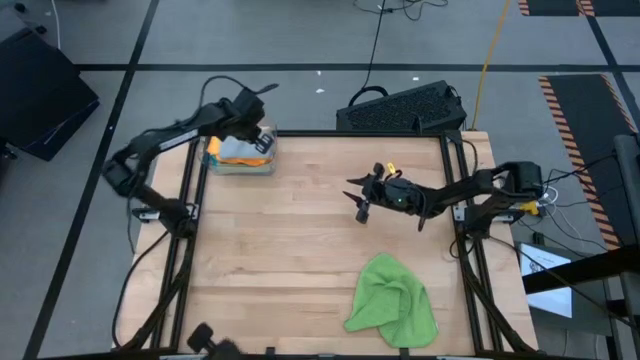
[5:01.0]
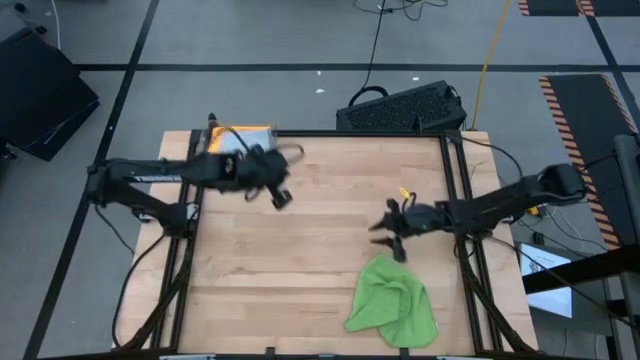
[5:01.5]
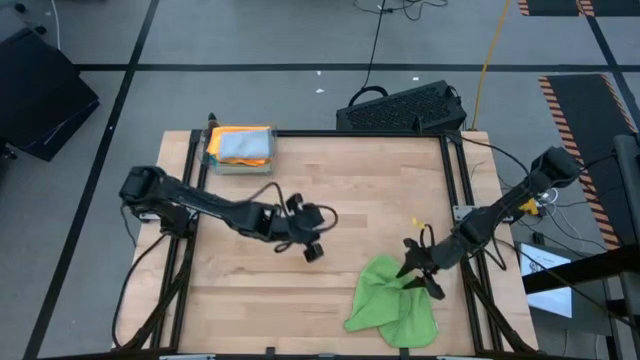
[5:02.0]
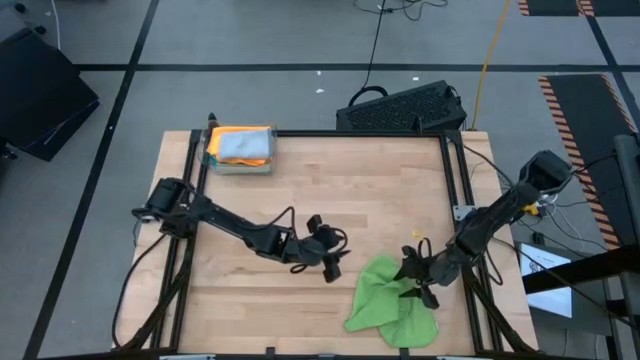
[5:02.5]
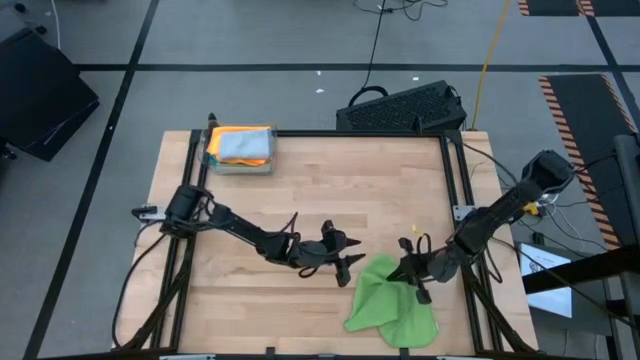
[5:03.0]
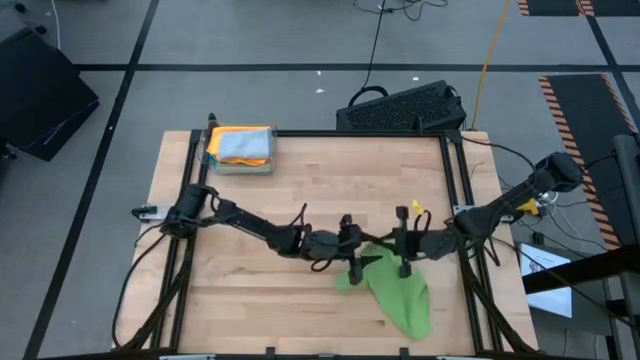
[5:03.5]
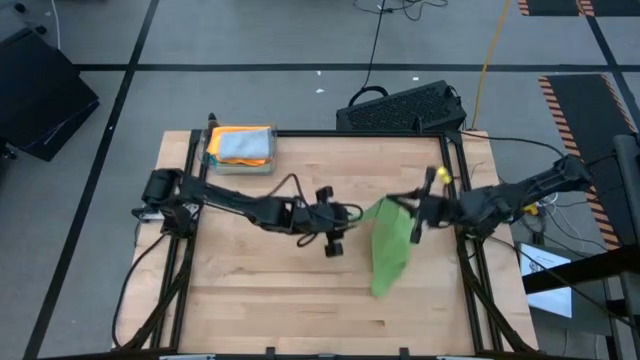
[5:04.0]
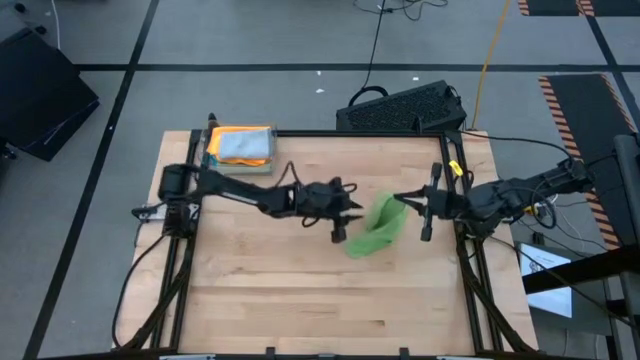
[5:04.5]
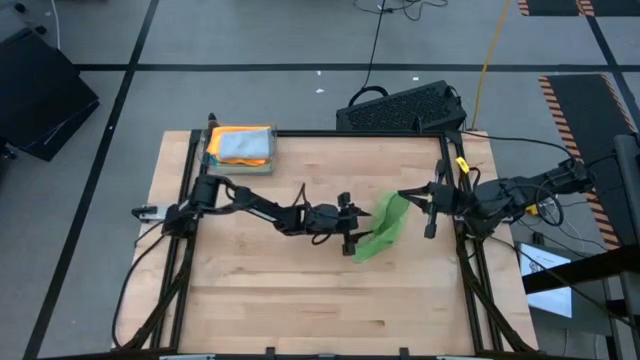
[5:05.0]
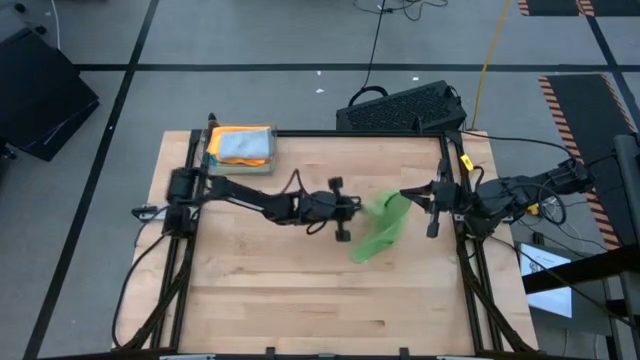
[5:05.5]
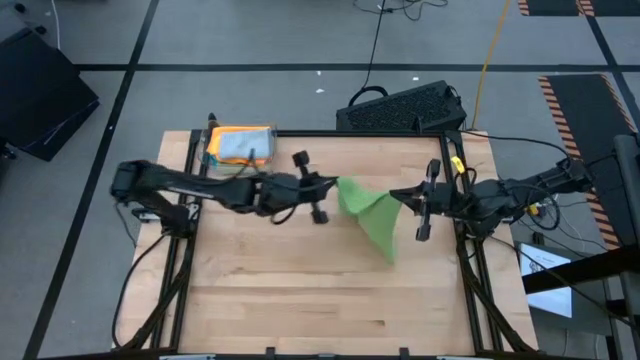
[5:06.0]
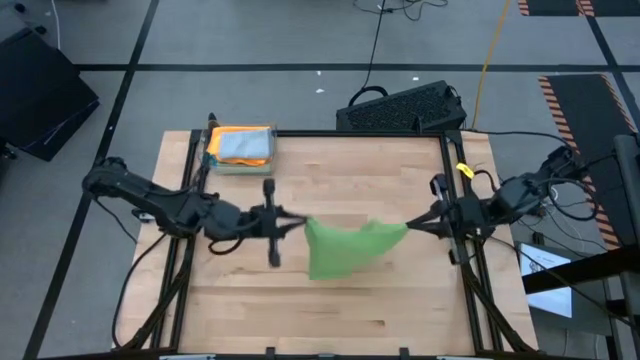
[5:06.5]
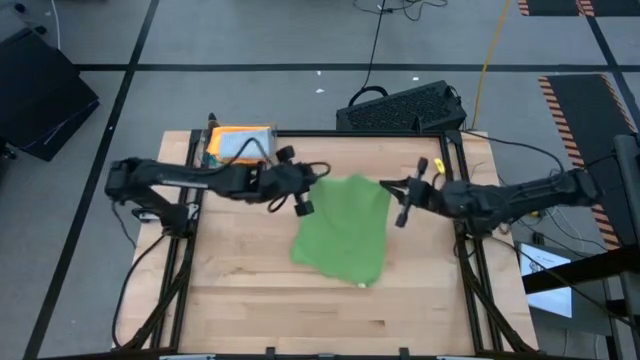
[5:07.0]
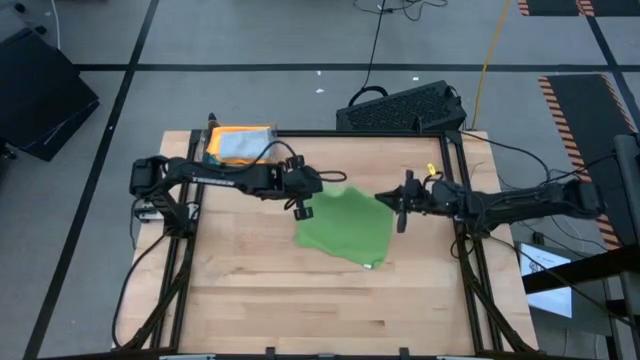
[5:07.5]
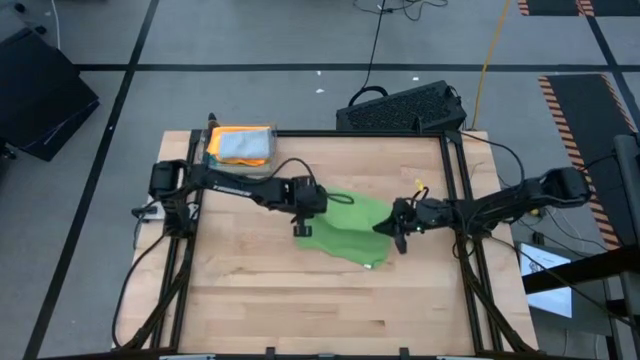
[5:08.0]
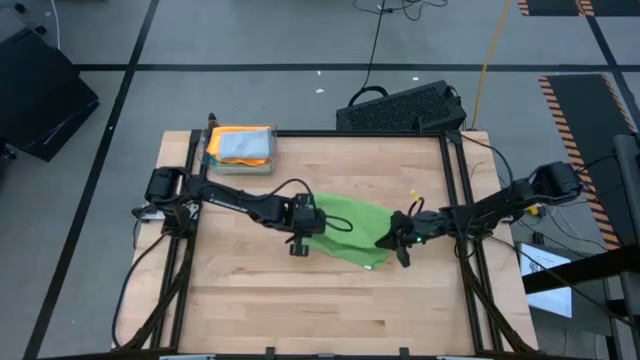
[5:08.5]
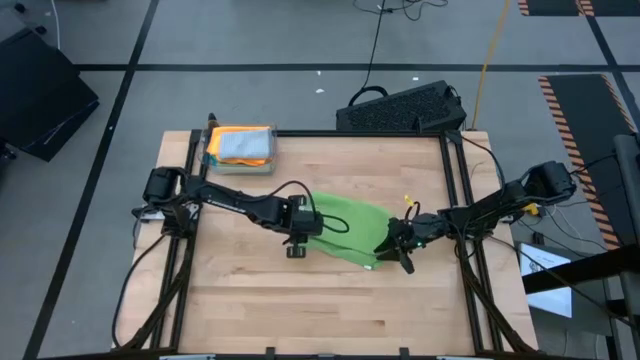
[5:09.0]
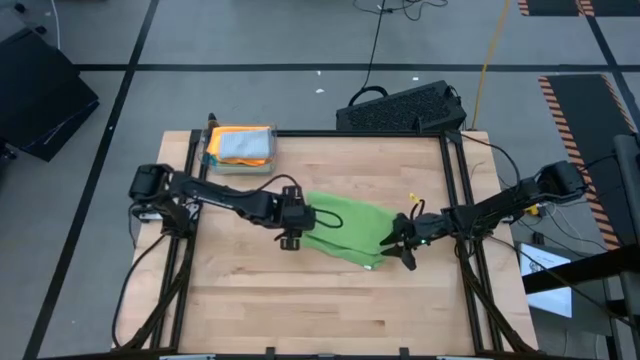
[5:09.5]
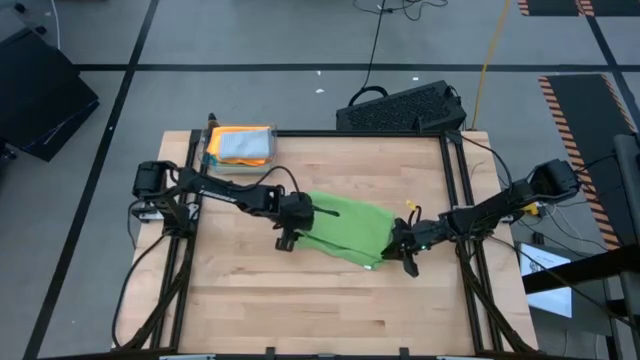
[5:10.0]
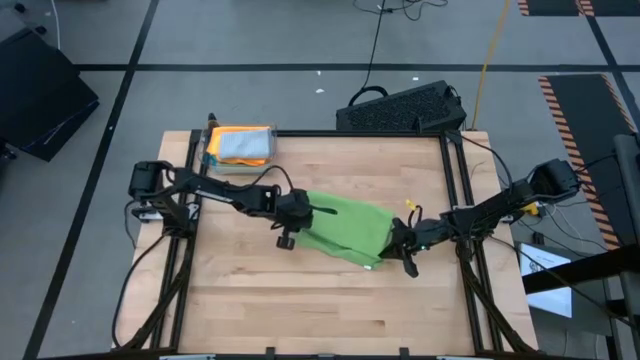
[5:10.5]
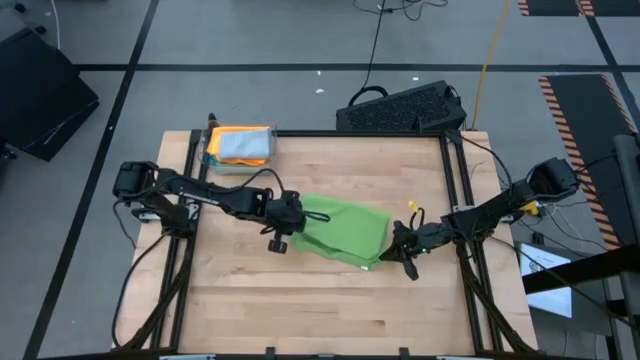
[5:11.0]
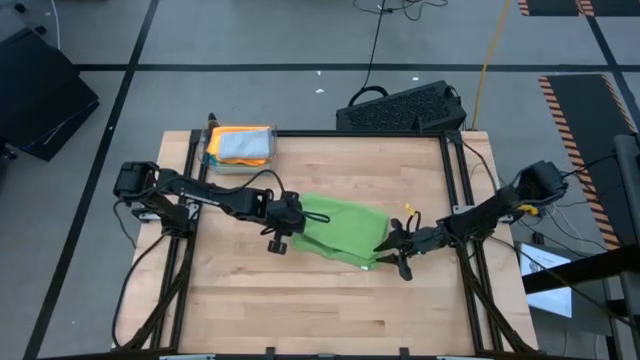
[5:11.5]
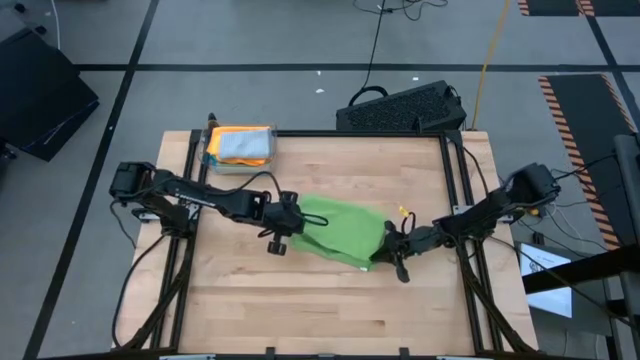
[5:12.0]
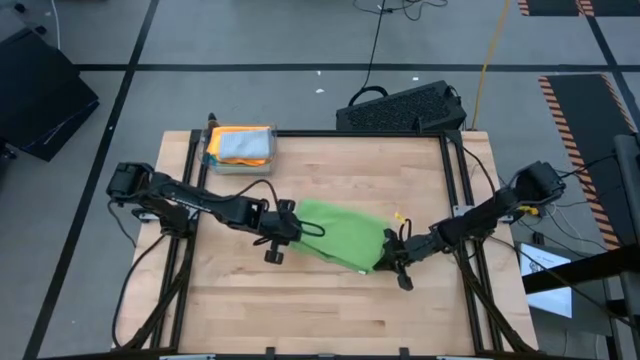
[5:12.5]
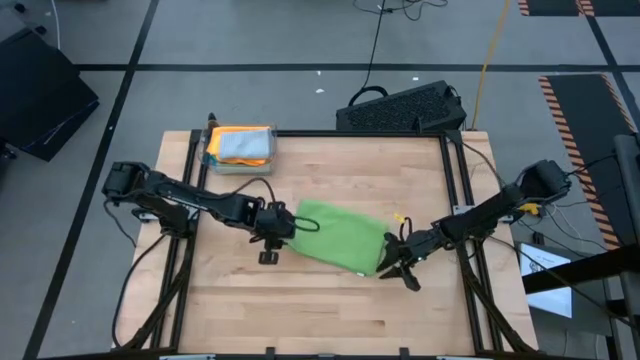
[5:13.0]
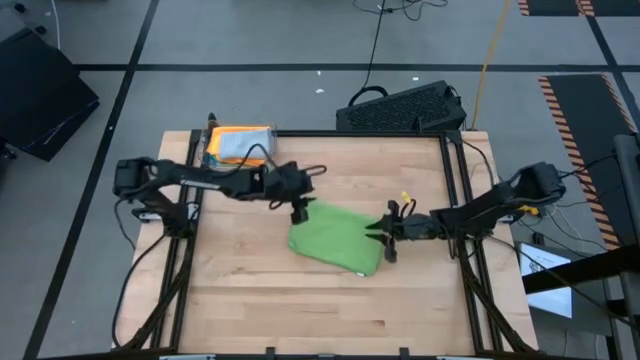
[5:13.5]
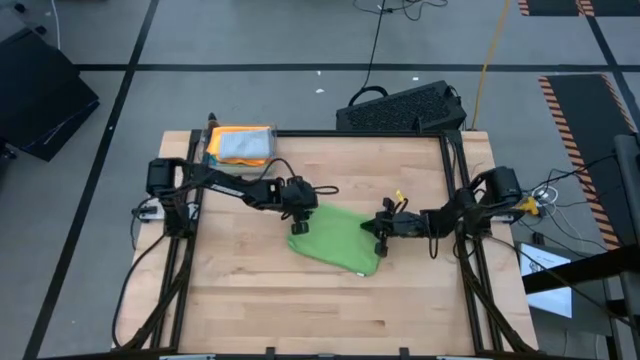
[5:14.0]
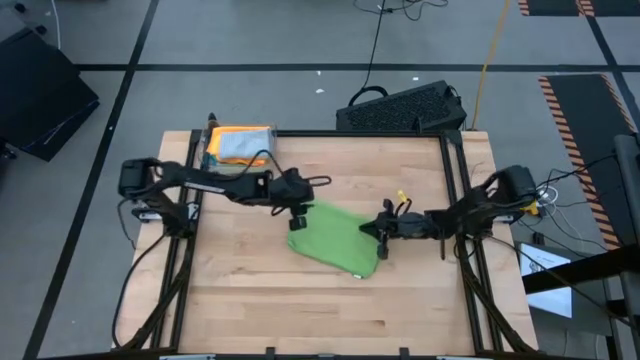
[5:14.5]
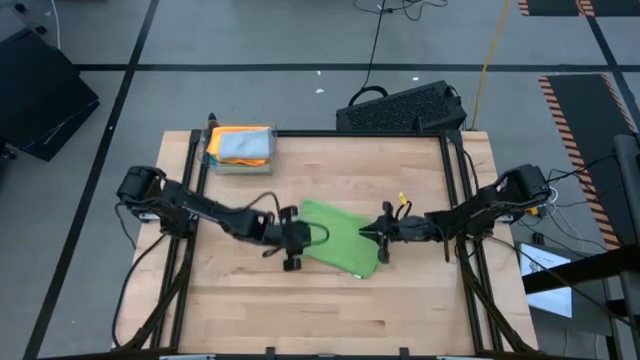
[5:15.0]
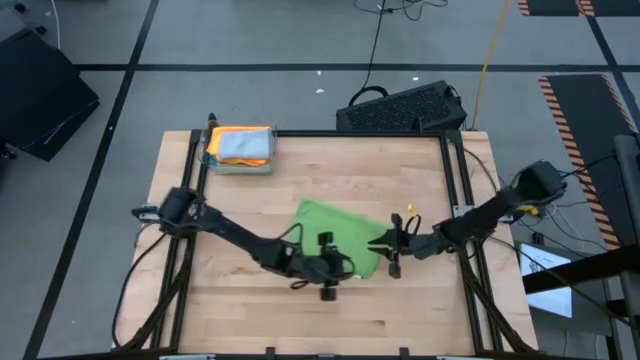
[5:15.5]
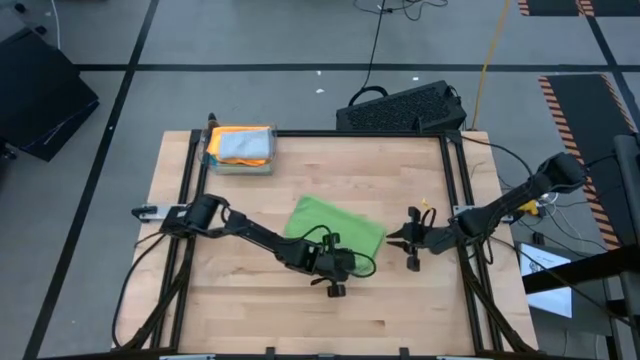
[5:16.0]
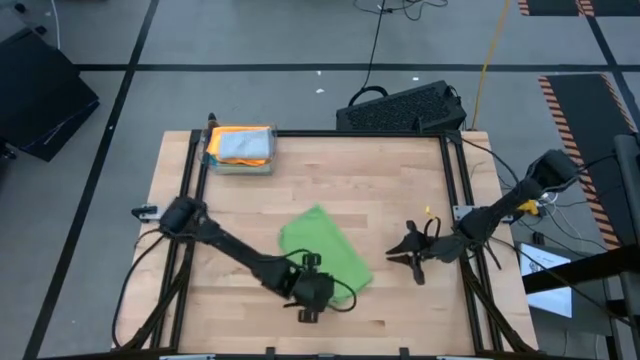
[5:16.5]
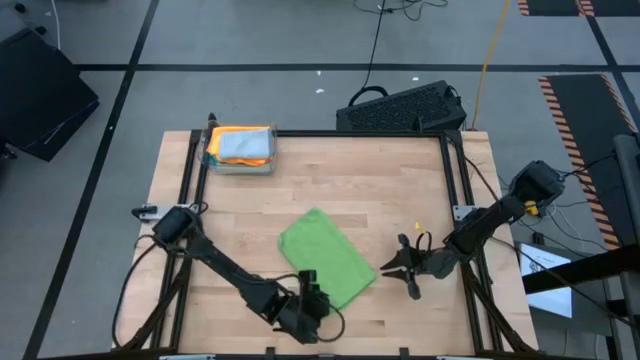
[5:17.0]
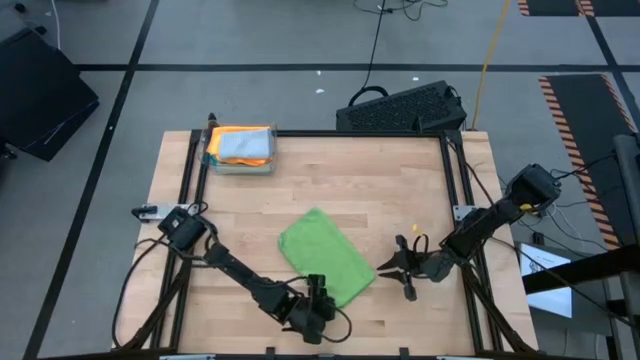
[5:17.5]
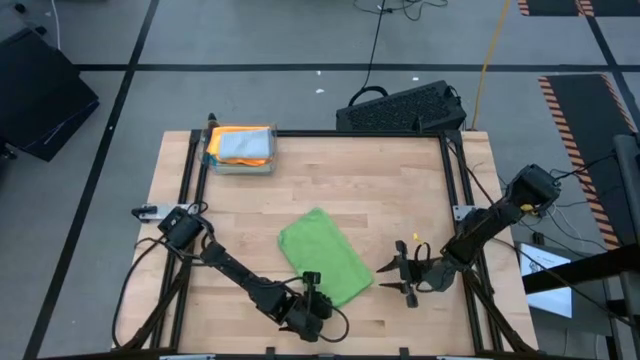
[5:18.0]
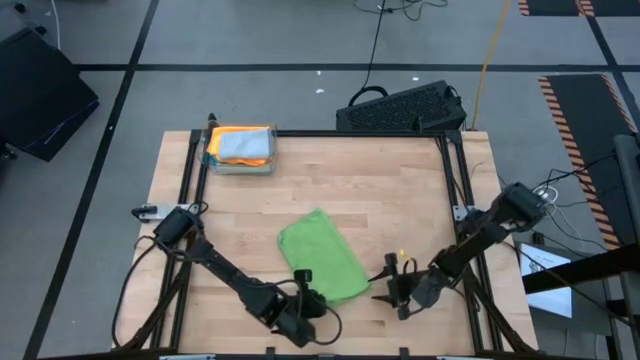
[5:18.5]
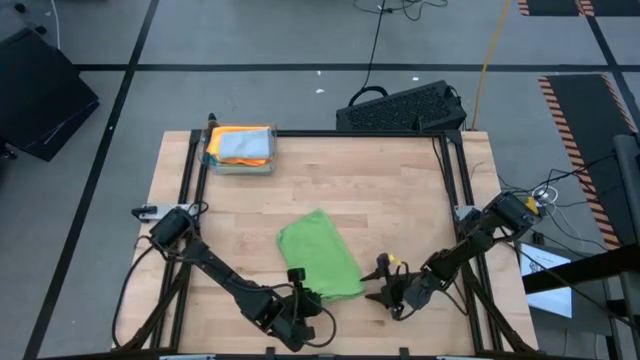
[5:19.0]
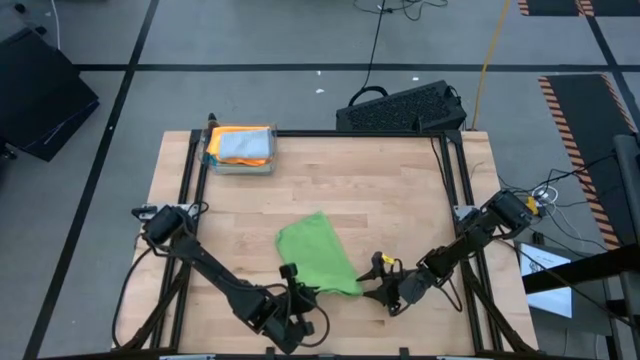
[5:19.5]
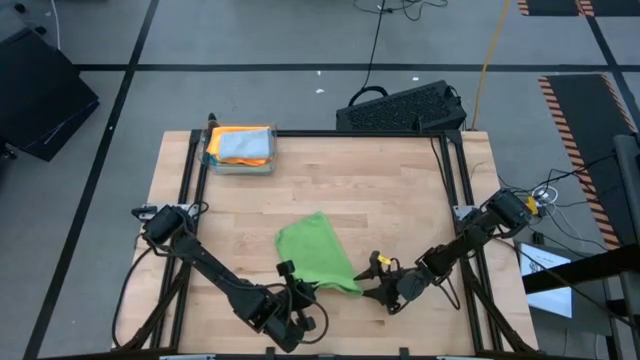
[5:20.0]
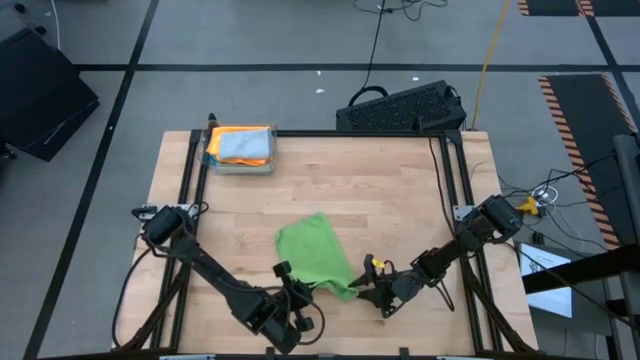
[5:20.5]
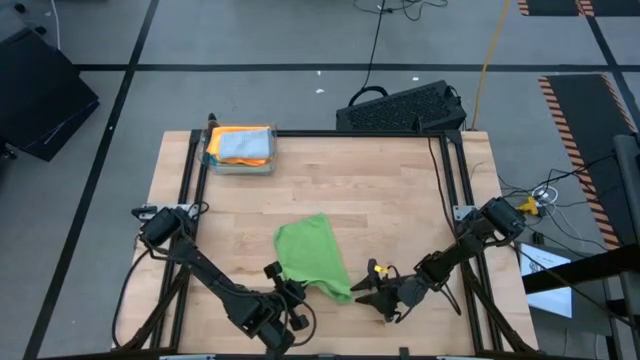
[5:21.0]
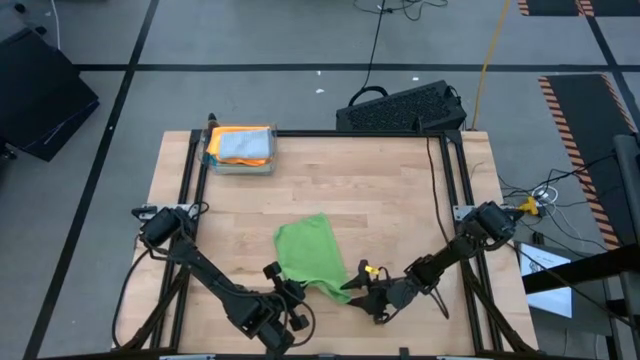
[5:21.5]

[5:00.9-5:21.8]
Task: Fold microfiber towels
Fold the green microfiber cloth

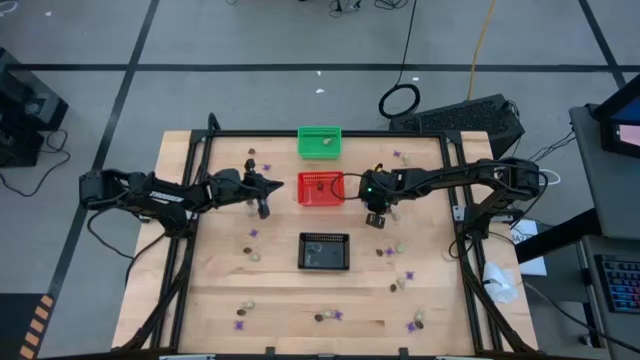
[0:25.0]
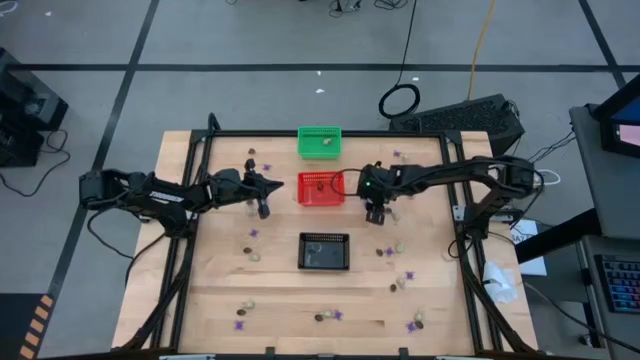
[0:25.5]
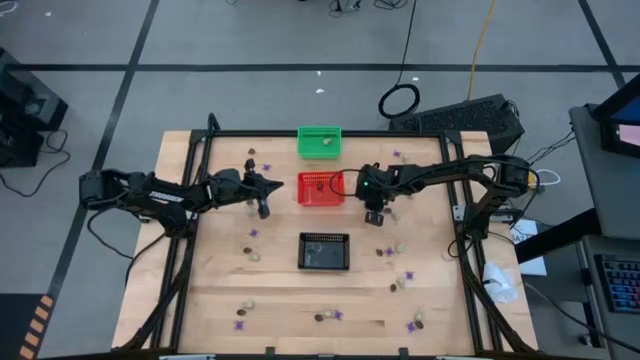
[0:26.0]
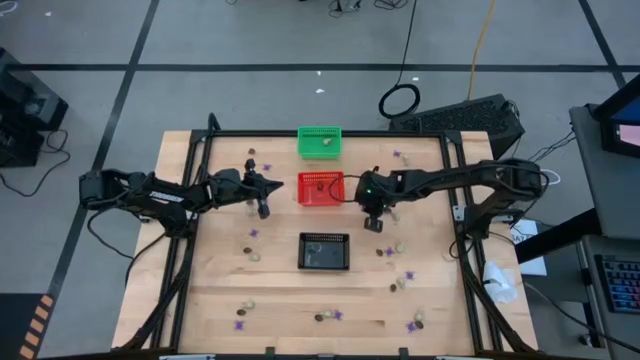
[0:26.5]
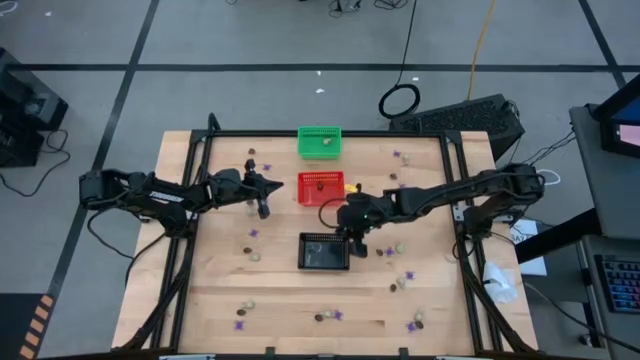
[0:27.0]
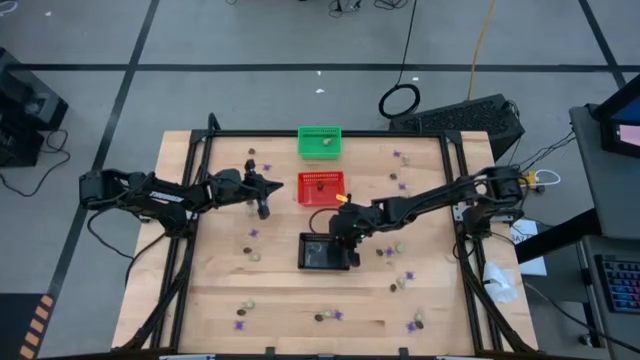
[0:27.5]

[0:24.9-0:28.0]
Task: Sort Halloween decoration
Put the violet spider toy into the black basket
